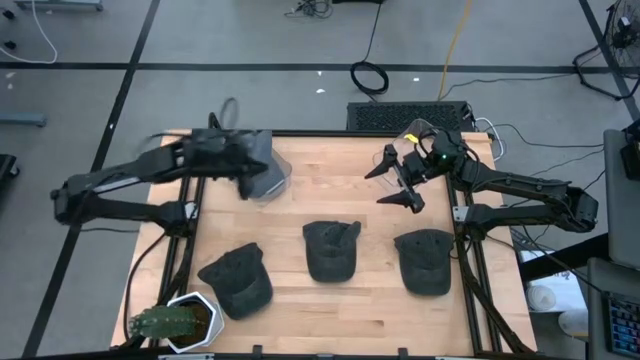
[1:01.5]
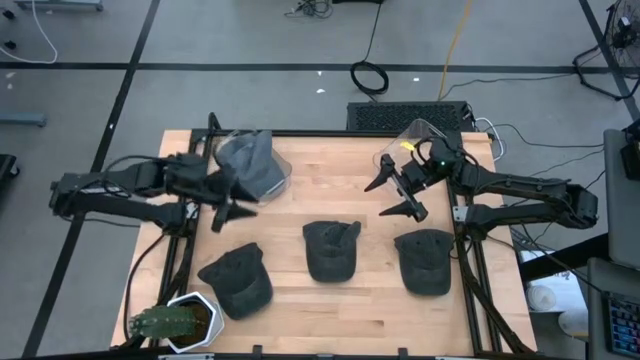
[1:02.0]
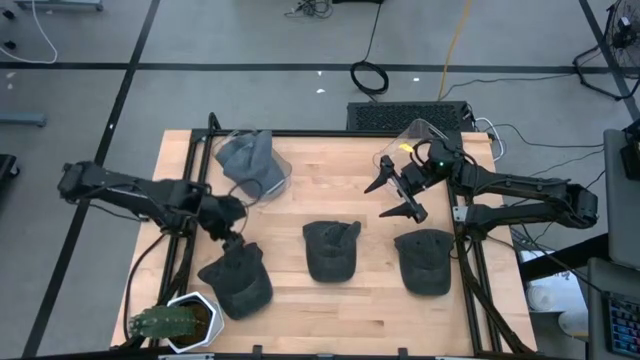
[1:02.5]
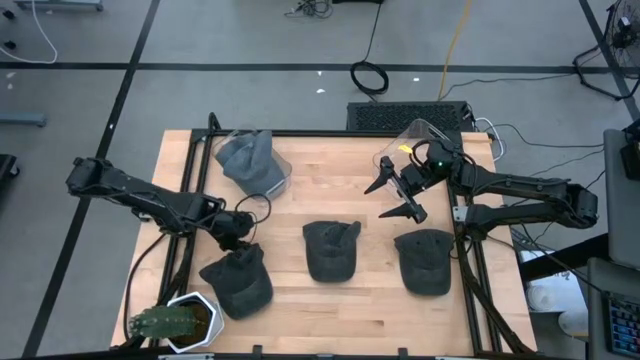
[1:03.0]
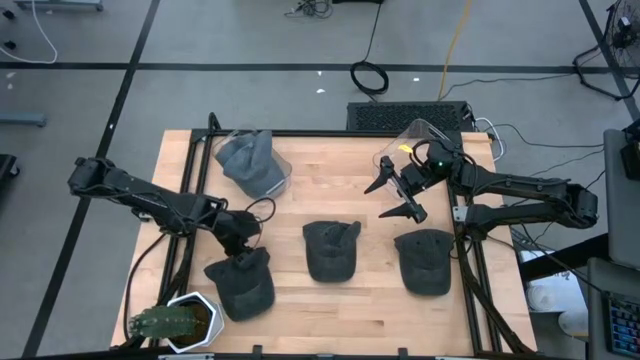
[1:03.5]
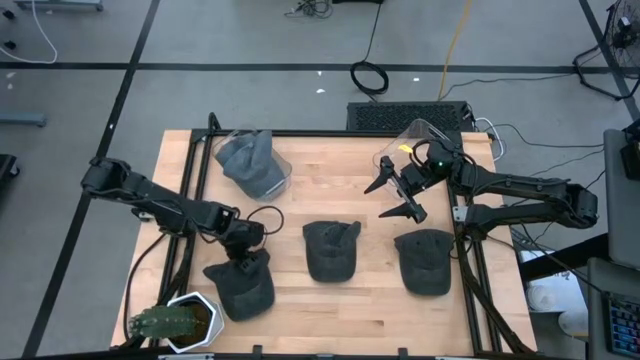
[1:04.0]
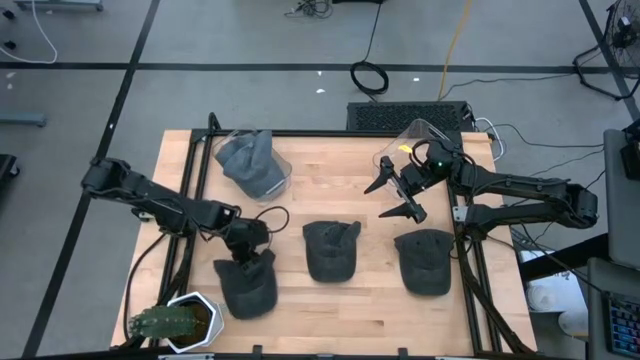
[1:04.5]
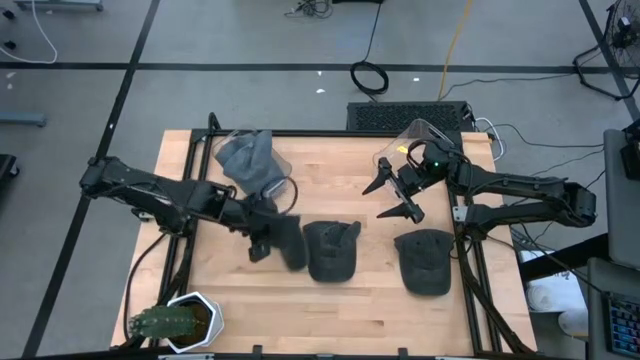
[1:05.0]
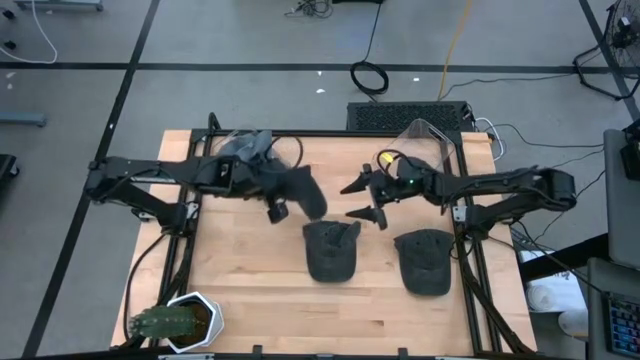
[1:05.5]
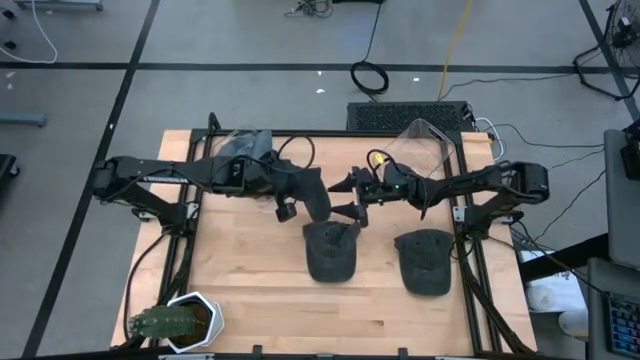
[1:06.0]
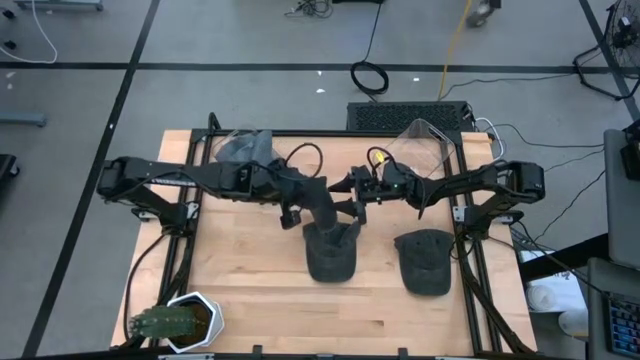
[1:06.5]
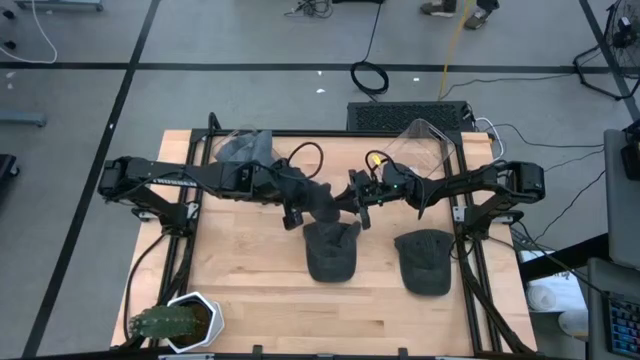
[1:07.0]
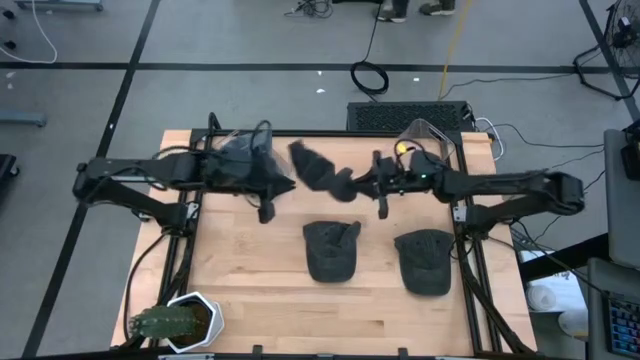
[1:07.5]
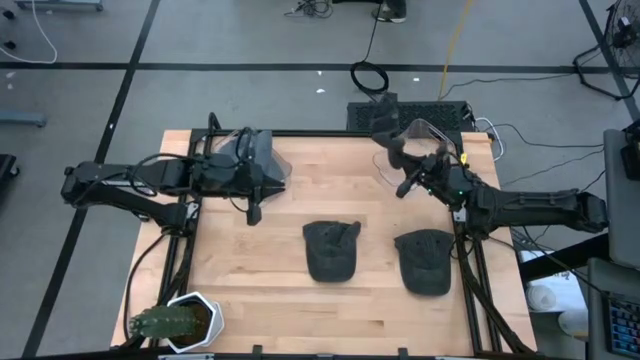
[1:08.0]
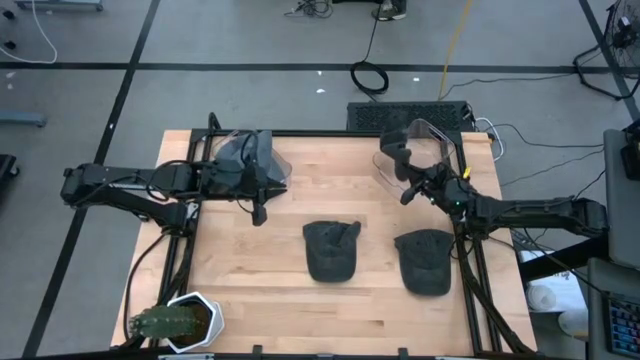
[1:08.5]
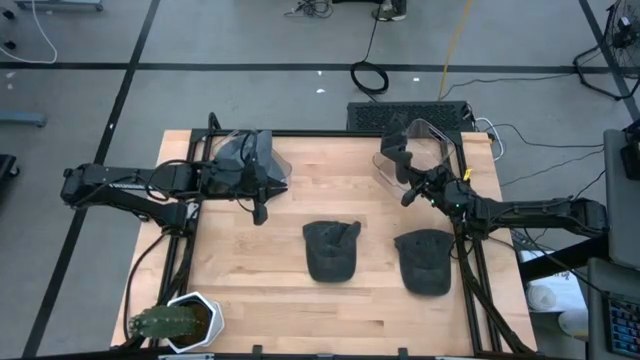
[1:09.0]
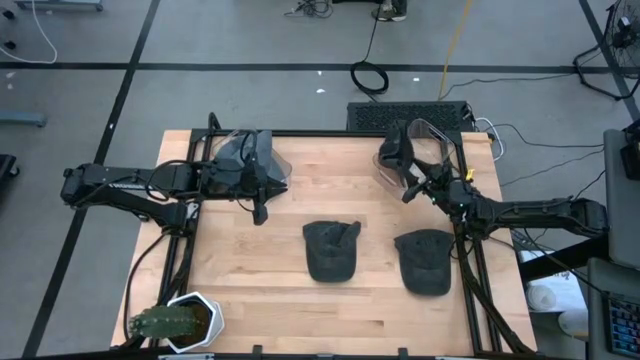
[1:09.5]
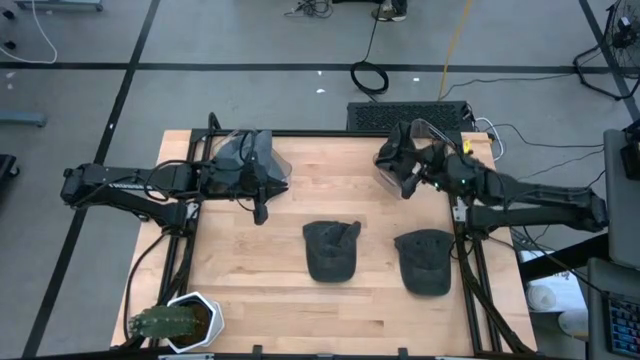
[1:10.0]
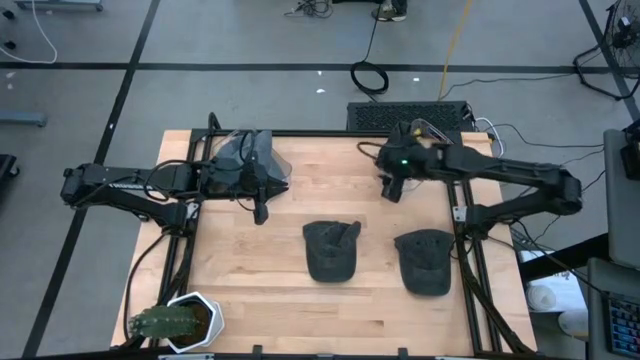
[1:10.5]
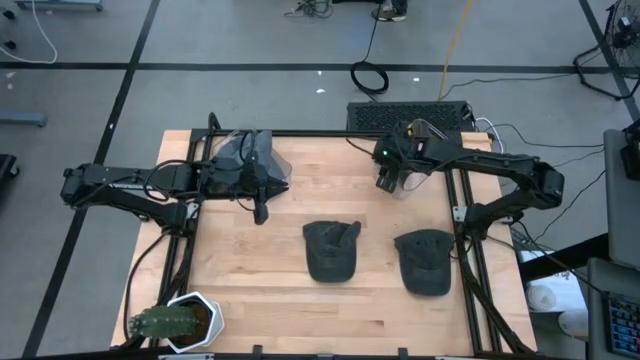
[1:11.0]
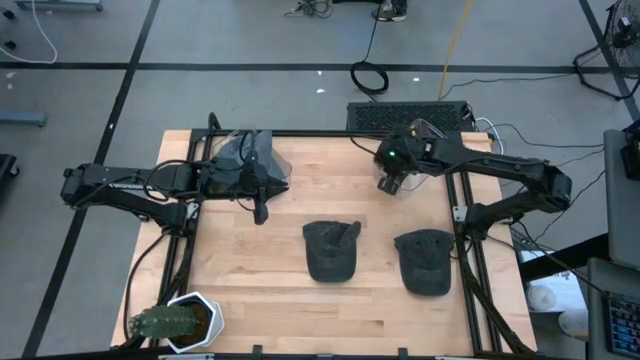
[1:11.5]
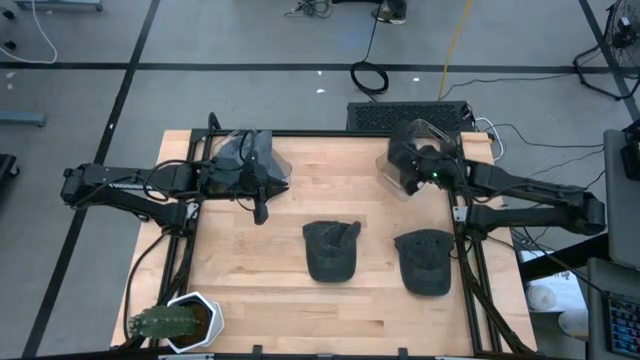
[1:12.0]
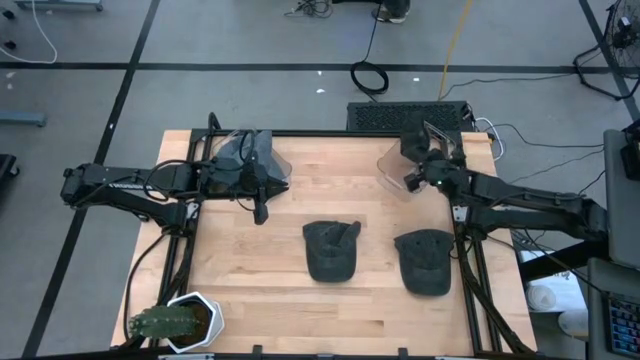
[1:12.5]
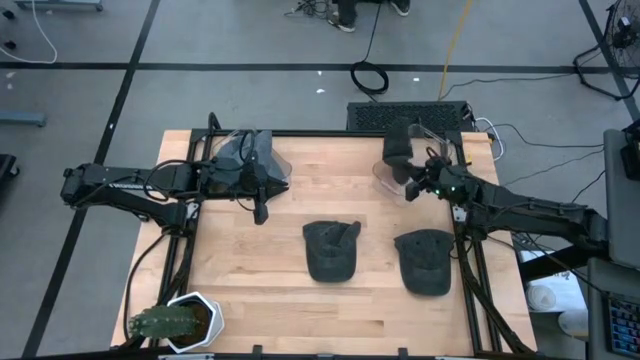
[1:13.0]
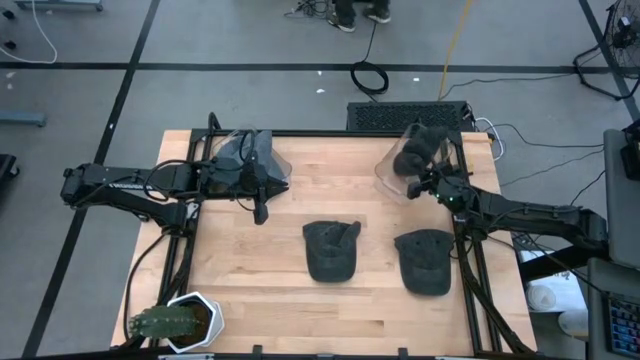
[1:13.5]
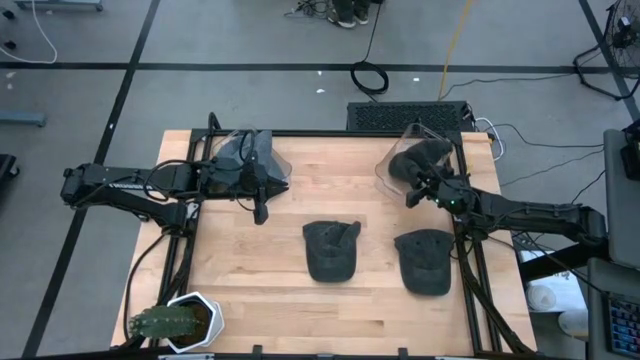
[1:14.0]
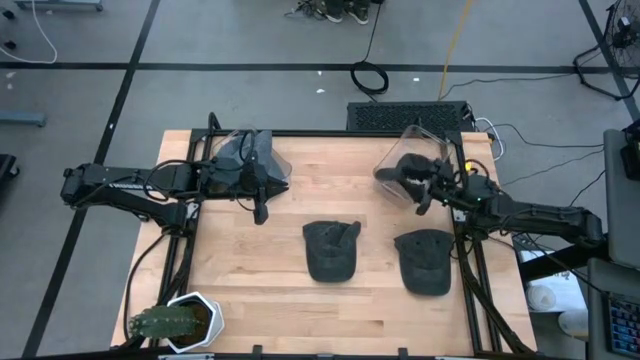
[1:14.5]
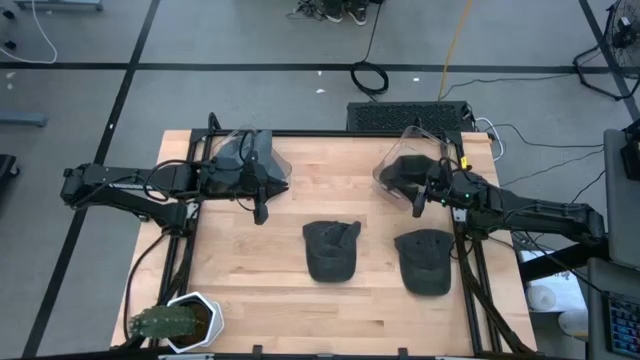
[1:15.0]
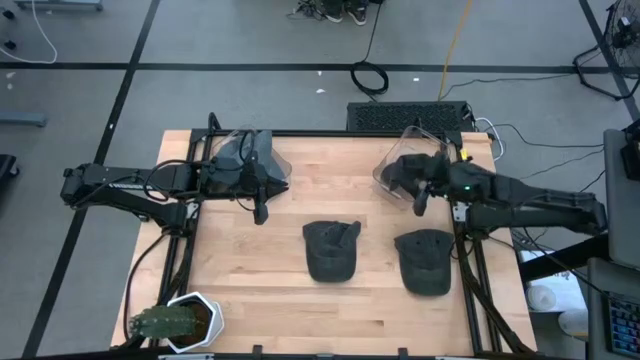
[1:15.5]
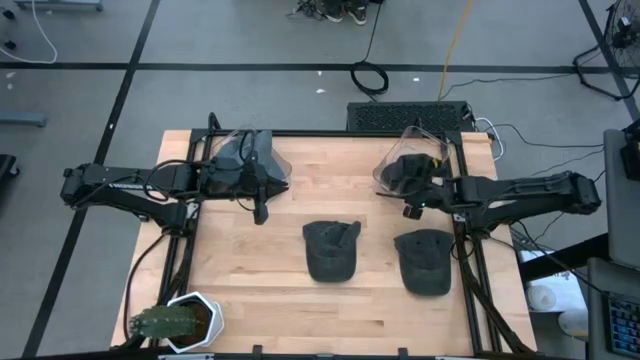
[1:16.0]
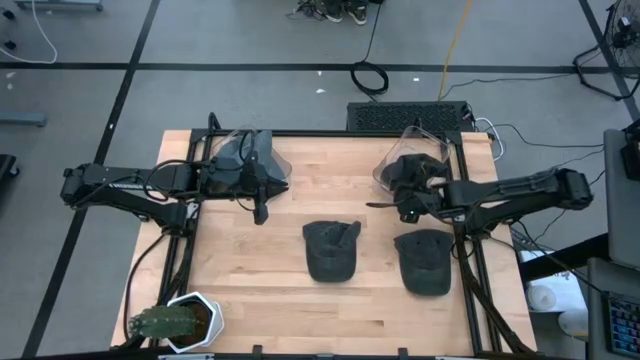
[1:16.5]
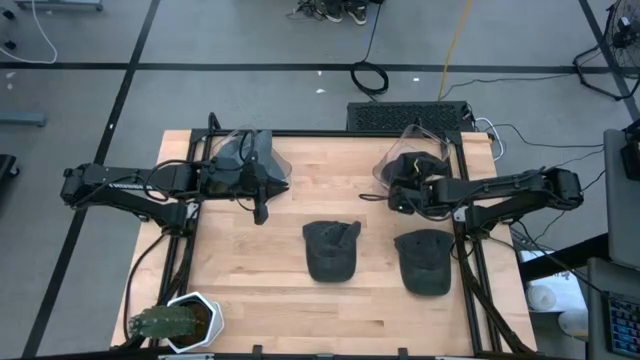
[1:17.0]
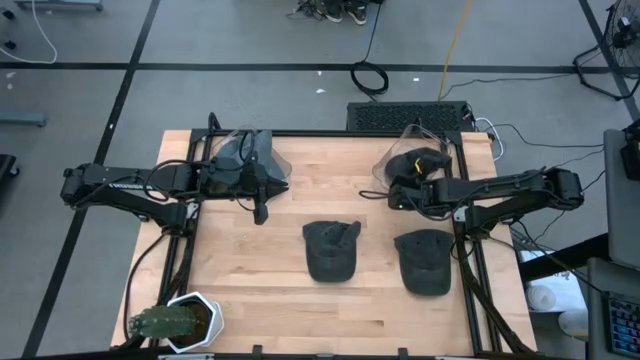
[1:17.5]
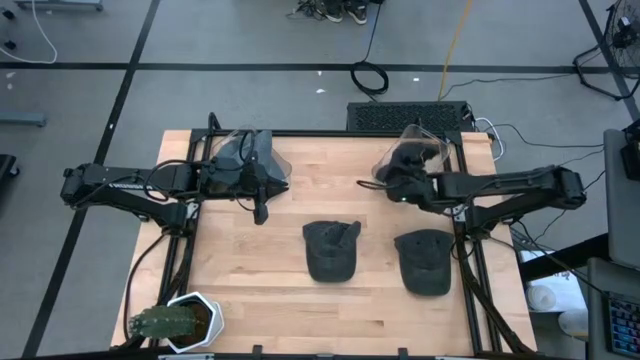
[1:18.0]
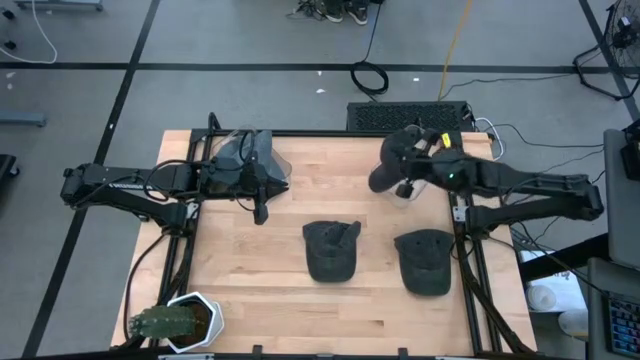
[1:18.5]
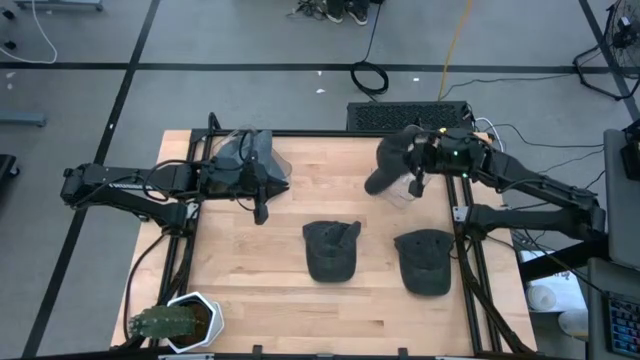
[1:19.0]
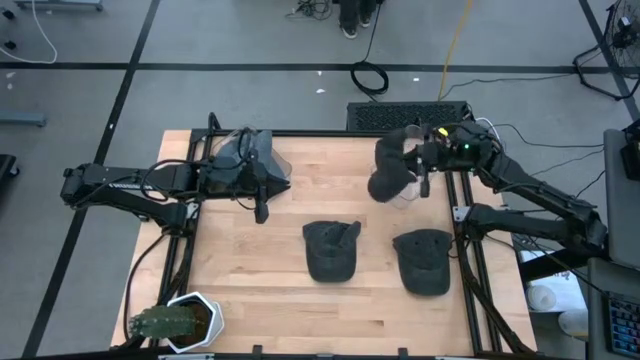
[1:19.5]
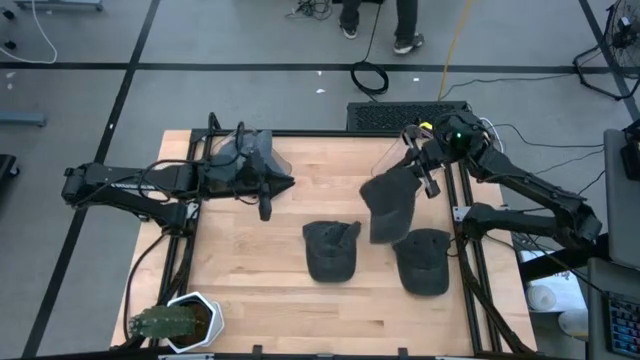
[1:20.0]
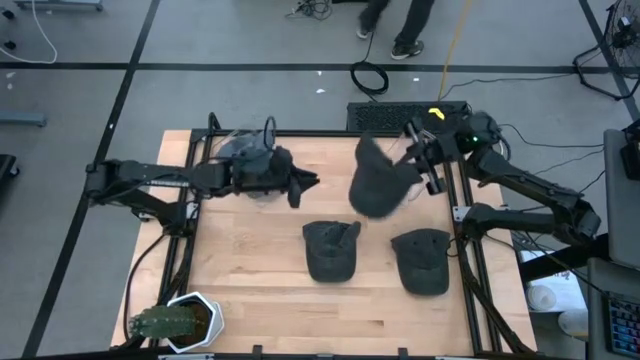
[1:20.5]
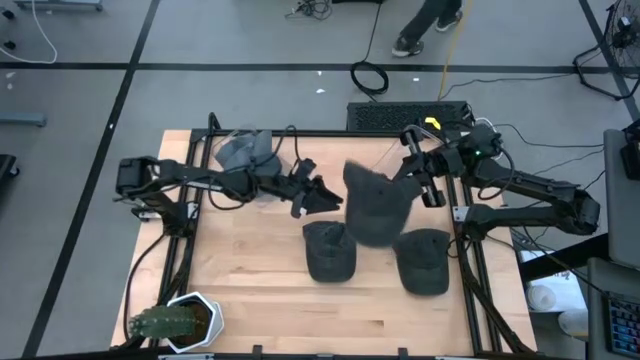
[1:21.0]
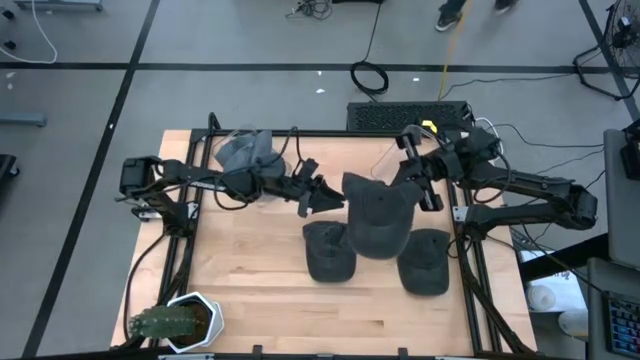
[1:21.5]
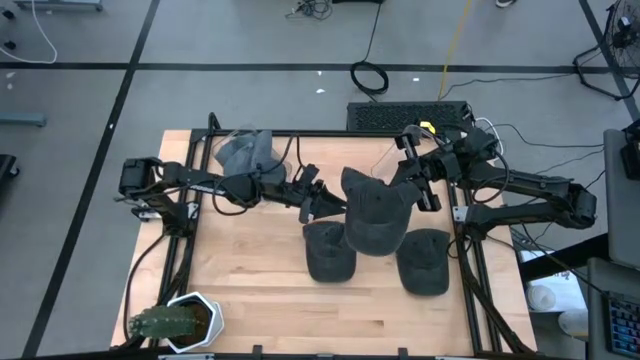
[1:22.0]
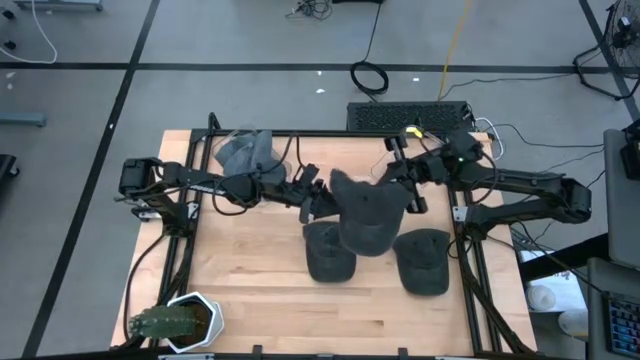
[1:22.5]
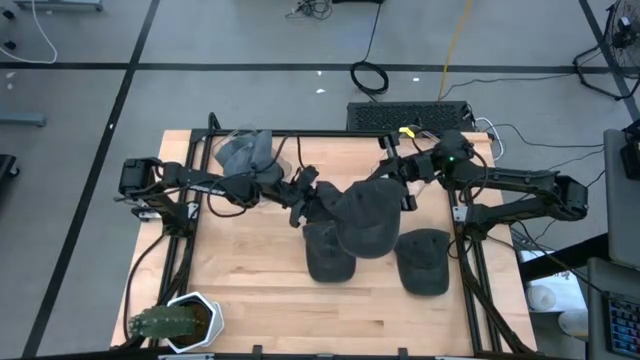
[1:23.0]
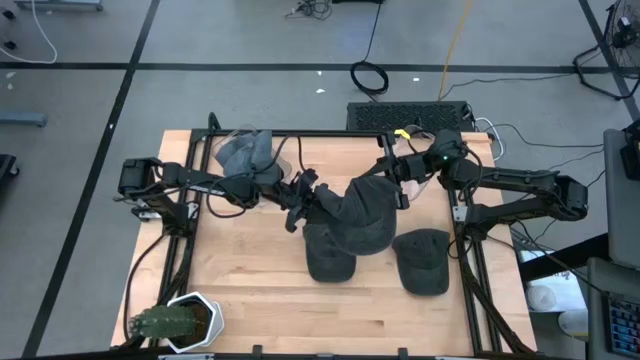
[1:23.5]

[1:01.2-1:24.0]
Task: Pick & Place hat
Put the left black cap into the right transparent bin
